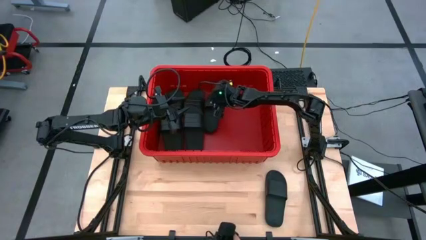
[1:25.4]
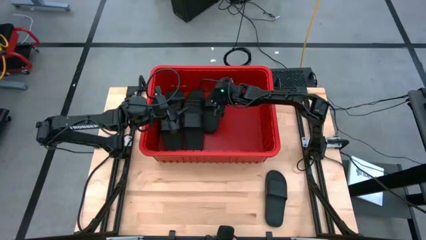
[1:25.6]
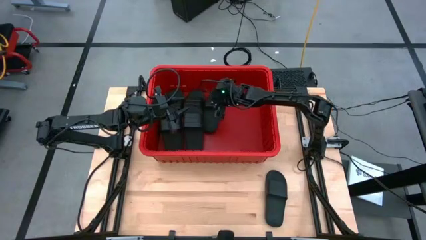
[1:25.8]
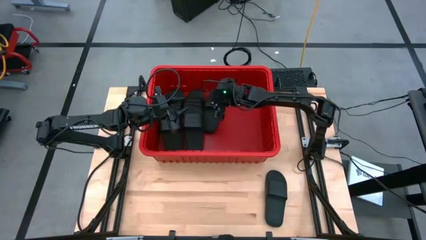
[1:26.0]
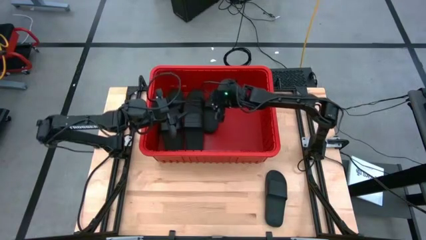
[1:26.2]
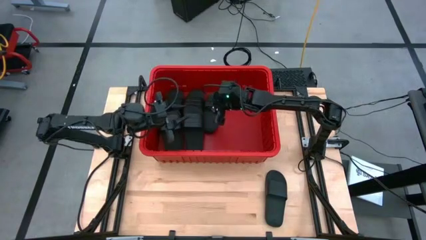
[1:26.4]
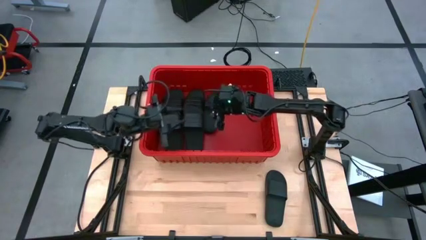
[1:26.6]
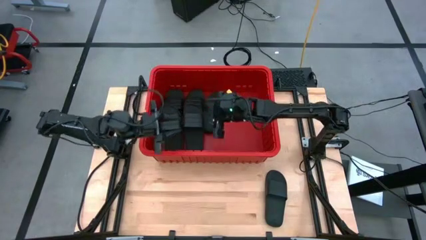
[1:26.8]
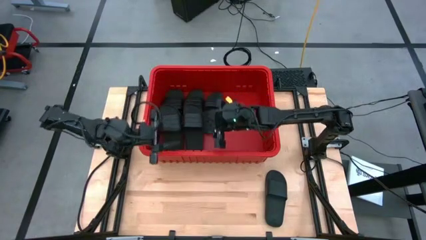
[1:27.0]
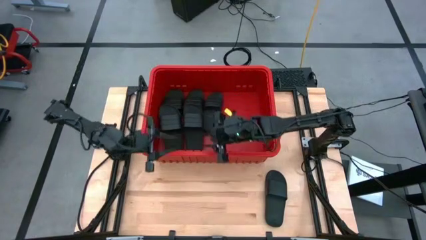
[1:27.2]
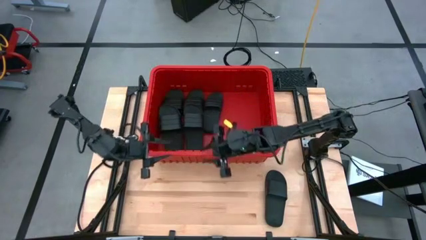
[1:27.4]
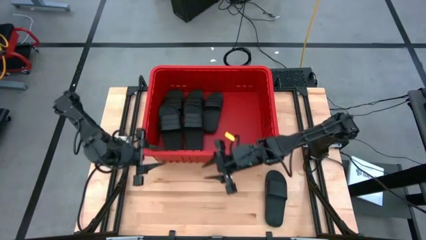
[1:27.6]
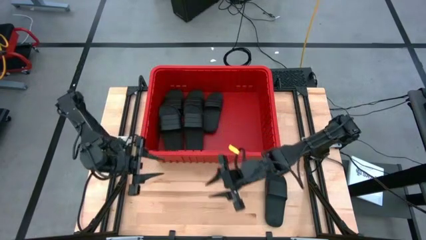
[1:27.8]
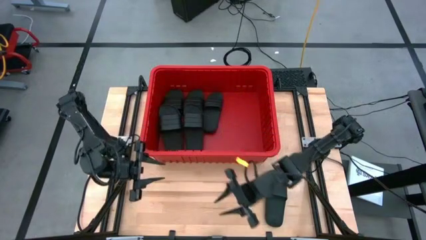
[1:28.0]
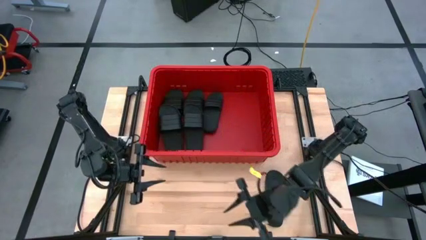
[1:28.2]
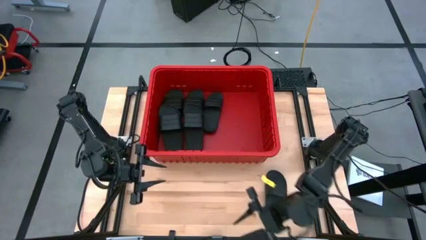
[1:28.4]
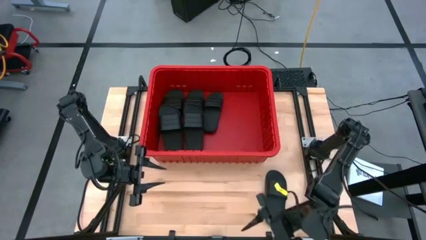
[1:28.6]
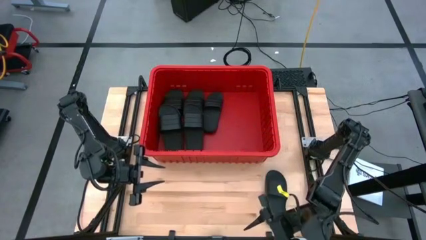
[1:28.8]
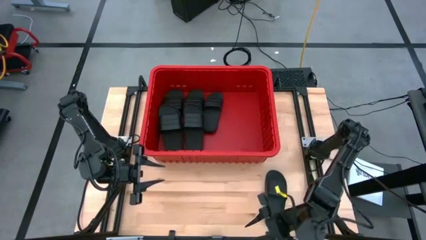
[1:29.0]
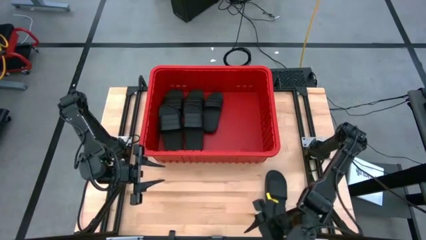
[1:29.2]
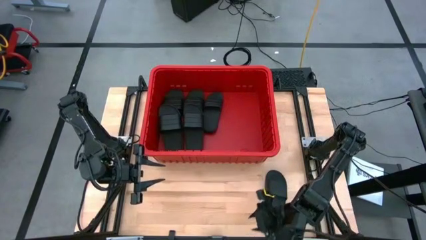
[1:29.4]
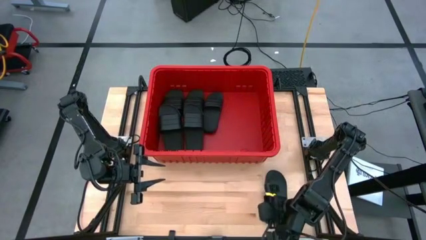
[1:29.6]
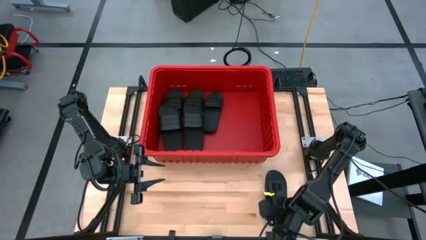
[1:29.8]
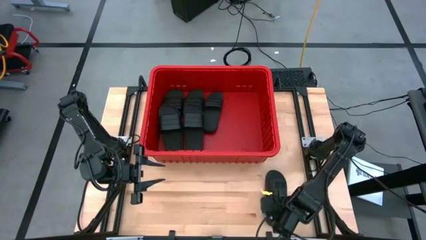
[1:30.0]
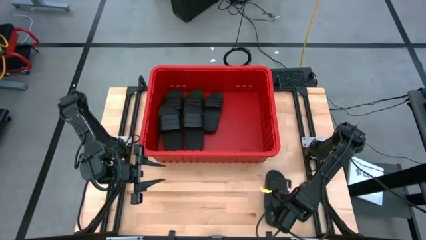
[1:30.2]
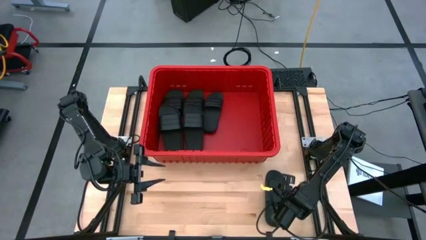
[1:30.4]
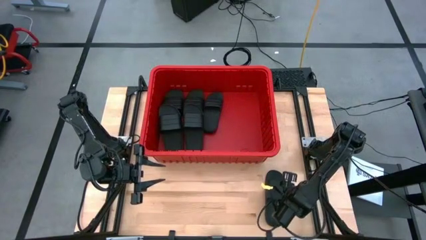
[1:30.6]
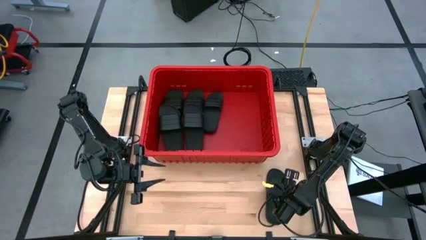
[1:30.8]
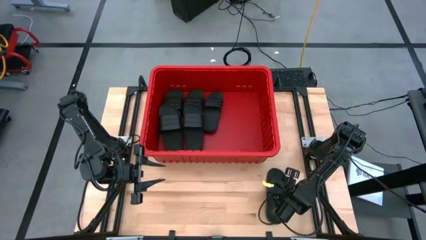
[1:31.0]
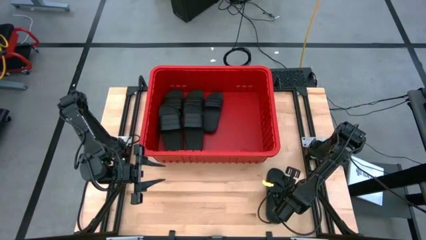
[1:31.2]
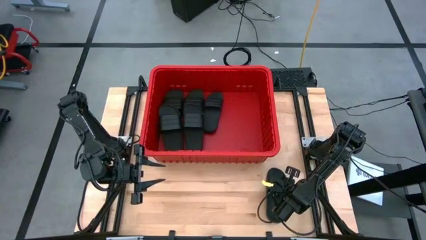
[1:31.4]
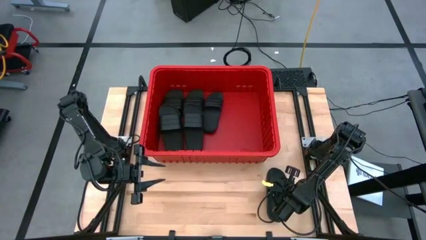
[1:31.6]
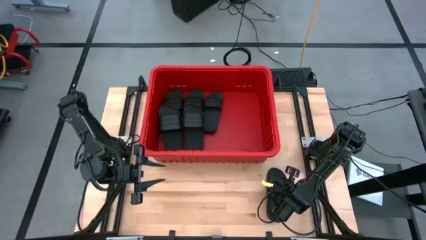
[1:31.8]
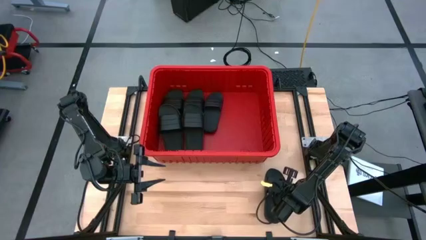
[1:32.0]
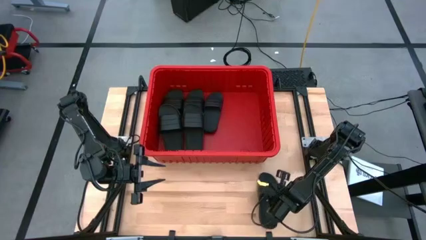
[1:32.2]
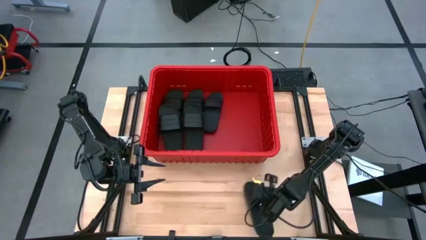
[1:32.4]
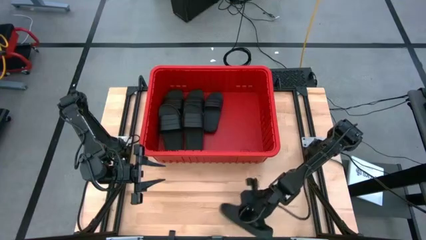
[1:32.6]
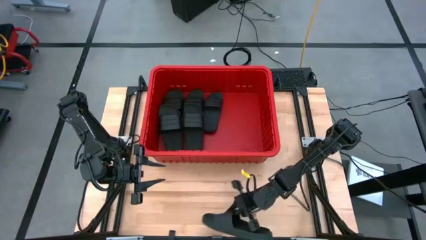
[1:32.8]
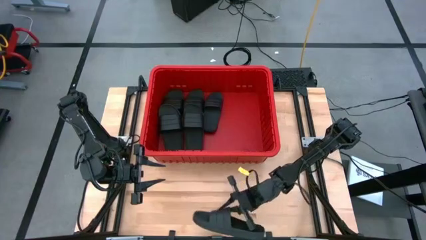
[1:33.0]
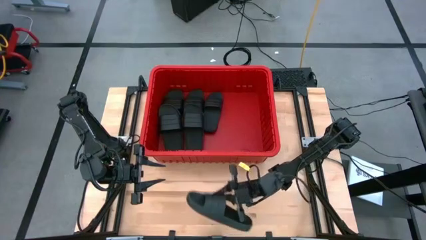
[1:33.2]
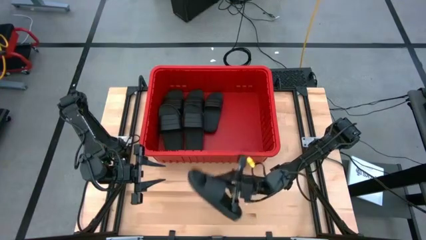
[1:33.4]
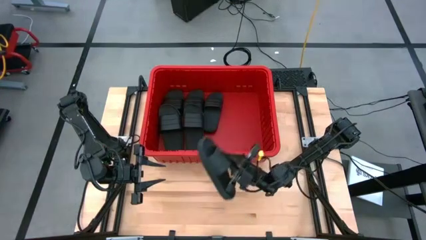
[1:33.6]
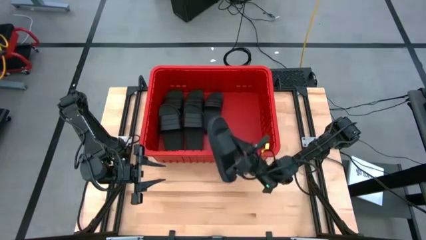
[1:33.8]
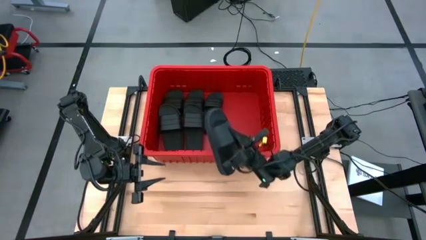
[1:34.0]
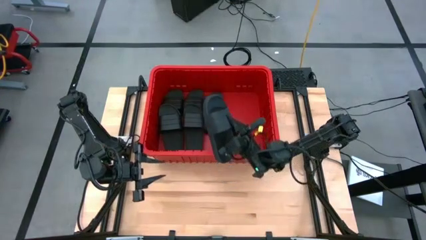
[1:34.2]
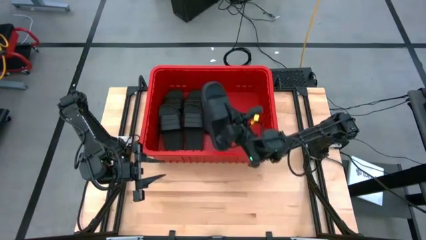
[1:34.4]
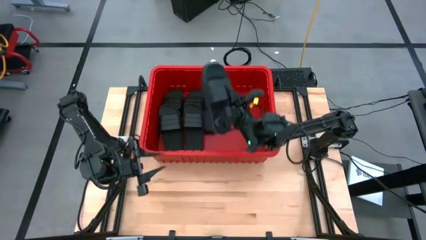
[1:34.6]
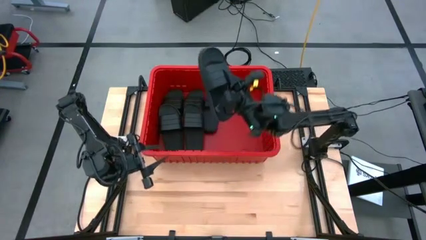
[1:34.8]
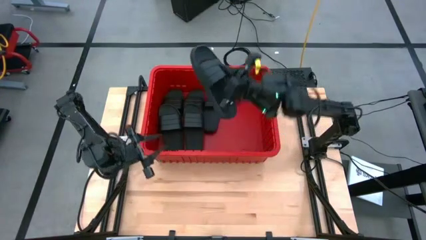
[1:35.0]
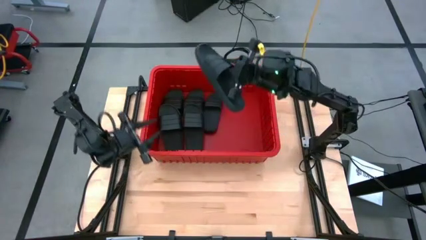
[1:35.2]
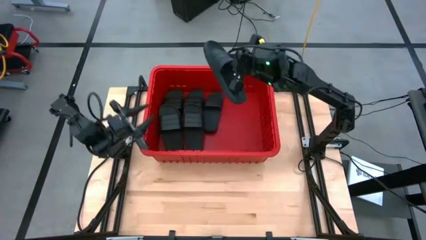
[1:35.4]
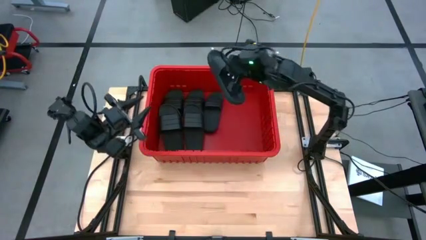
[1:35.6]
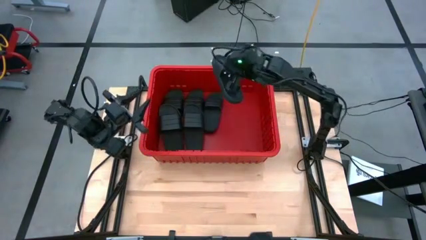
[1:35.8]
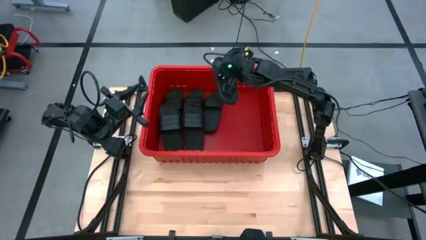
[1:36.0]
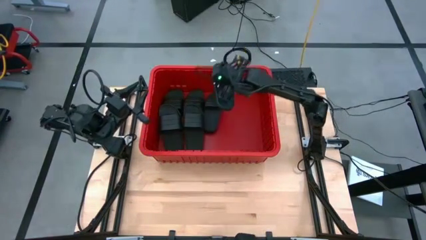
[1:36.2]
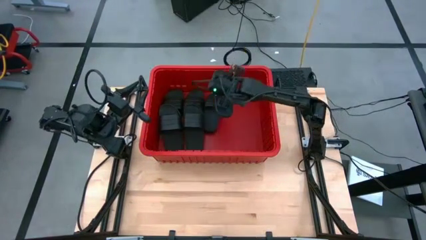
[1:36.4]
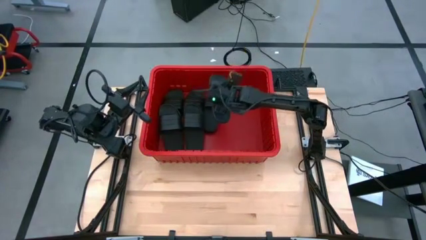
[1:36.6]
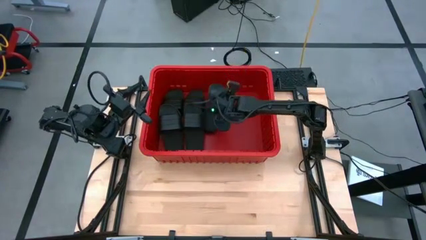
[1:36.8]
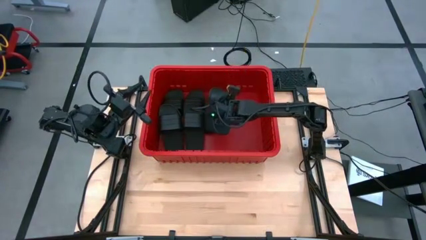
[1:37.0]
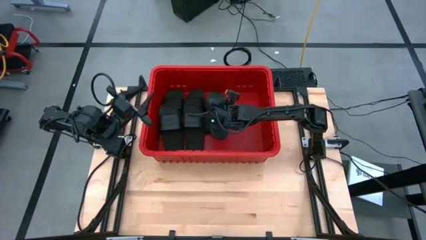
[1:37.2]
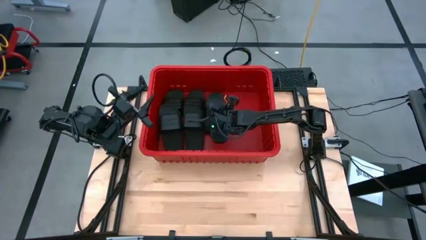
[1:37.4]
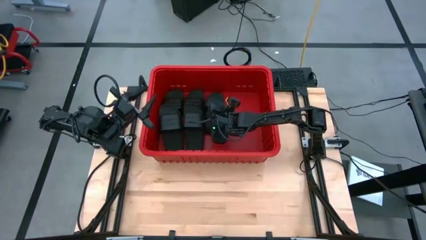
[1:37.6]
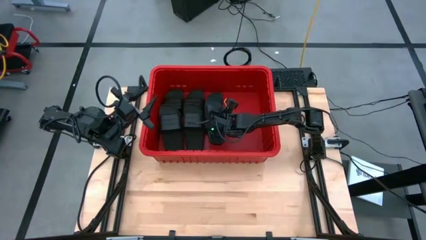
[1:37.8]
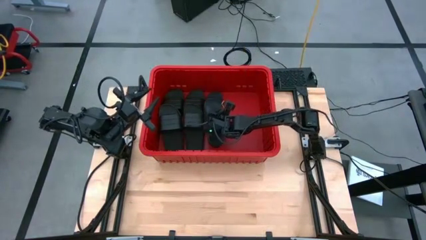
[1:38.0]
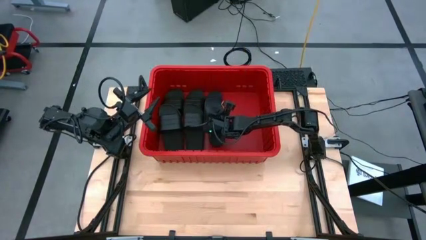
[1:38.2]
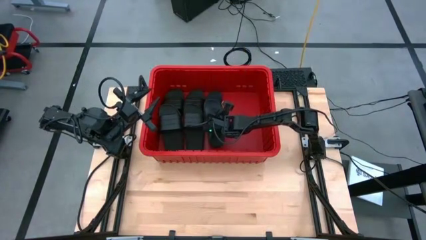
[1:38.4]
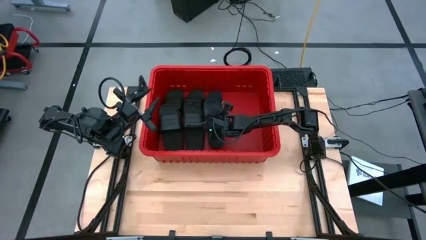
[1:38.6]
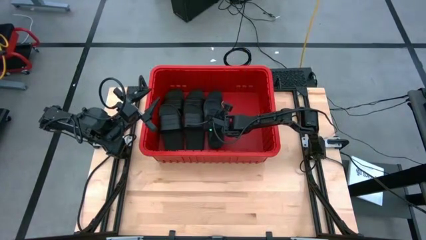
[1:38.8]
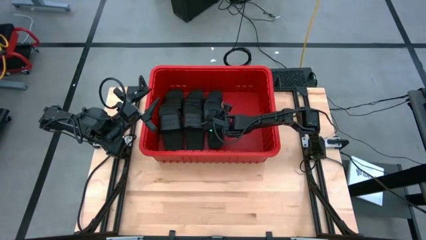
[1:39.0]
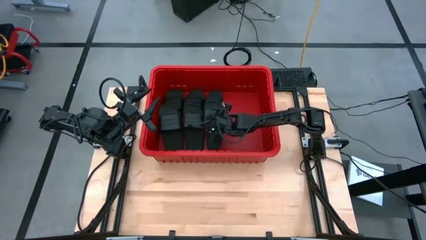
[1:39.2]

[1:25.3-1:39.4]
Task: Pick and place slides into bin
Put the black slide into the red bin
